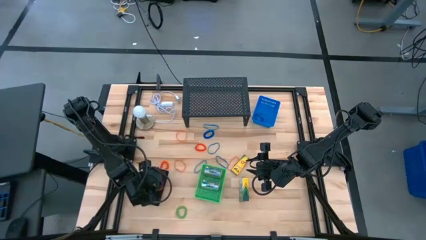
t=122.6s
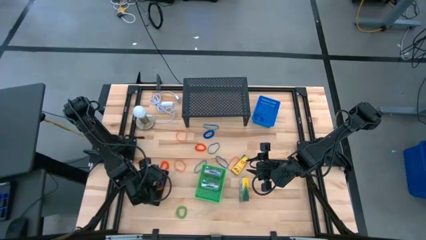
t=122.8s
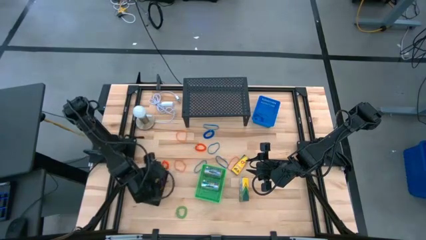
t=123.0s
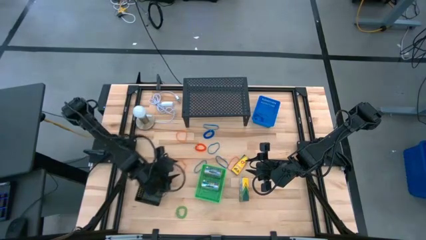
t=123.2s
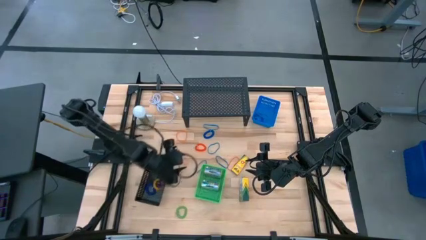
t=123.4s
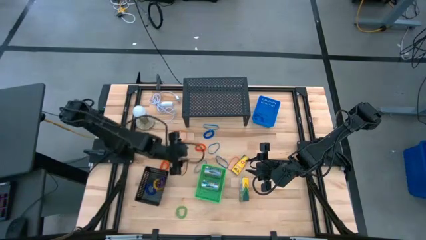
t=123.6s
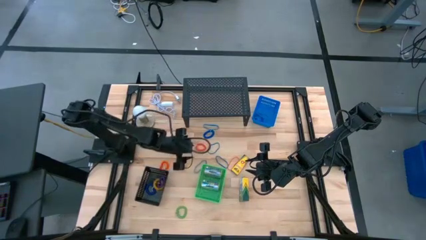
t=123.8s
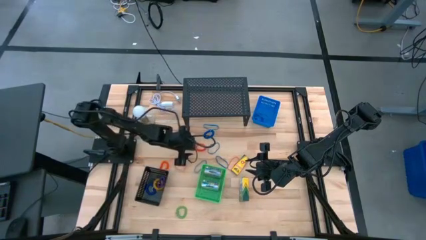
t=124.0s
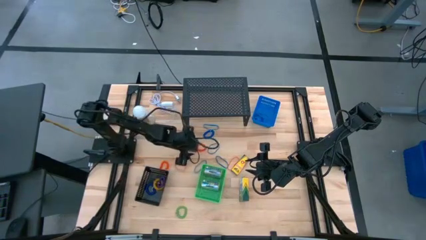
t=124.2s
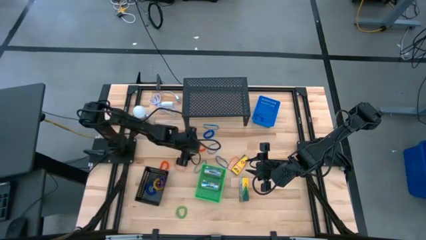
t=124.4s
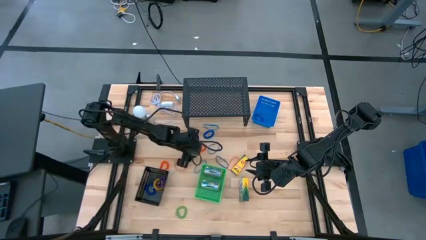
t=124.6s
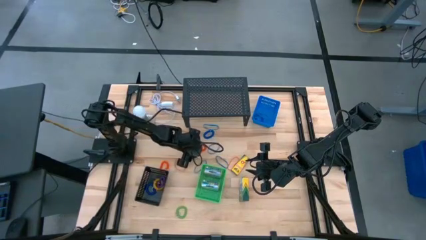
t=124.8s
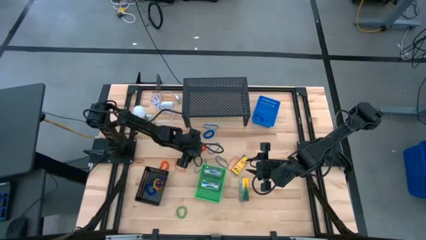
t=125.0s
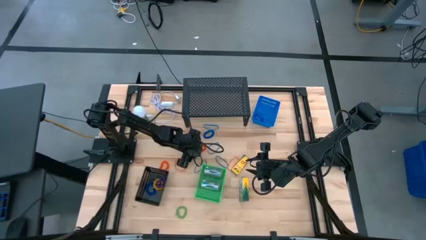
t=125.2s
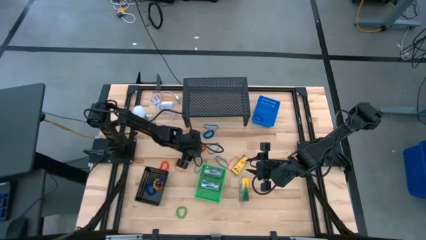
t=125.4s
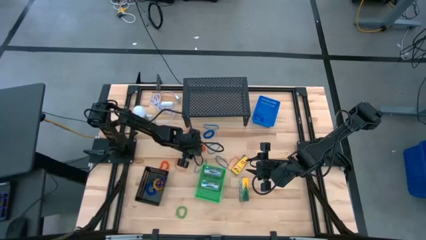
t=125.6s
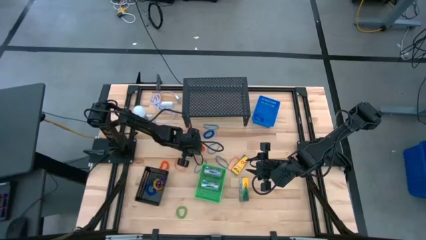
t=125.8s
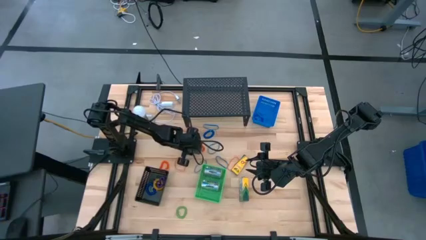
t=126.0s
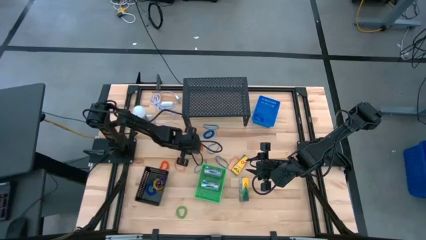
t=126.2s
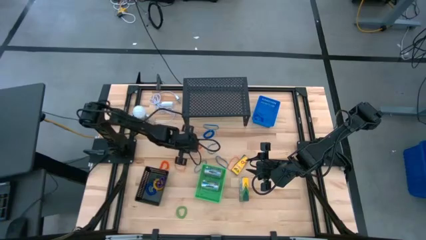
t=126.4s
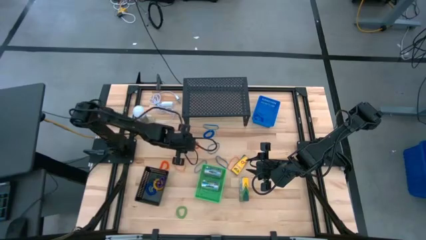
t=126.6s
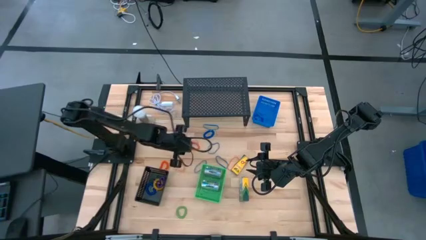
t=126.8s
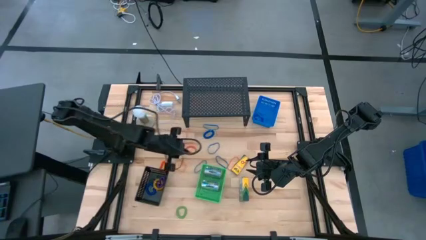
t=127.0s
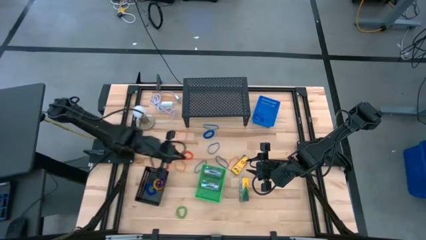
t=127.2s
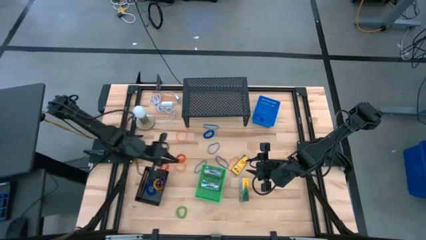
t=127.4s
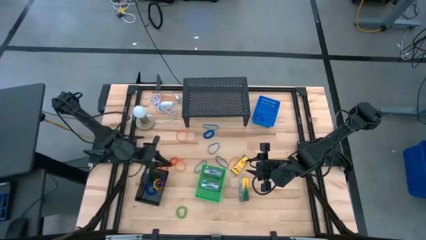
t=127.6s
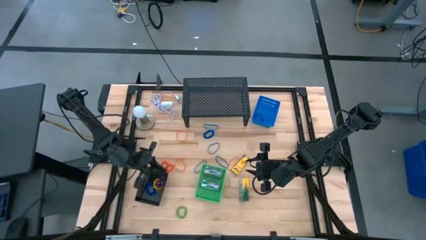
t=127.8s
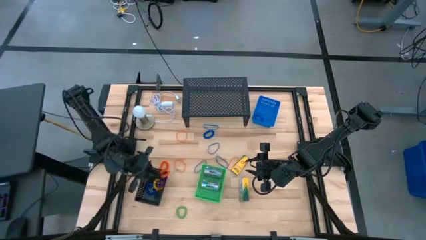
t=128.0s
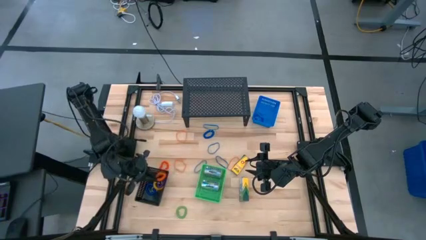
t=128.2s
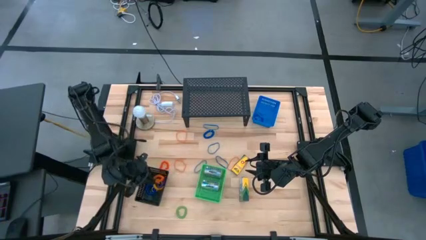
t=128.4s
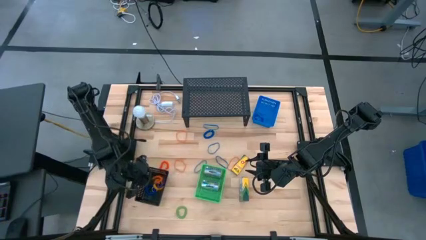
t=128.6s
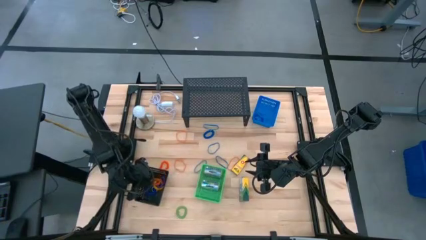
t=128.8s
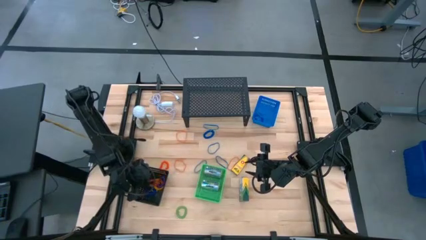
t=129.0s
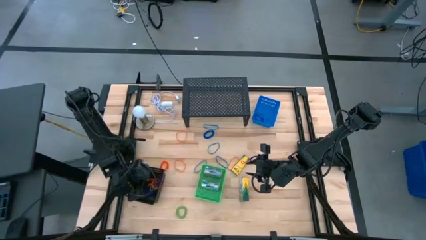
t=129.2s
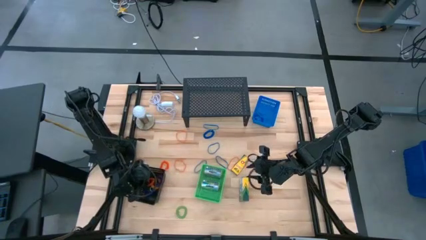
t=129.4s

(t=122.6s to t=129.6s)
Task: Pick & Place Office Desk Supplies
Put the orange spring keychain into the black bin

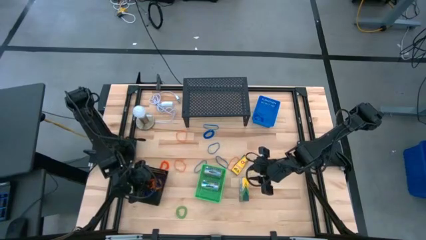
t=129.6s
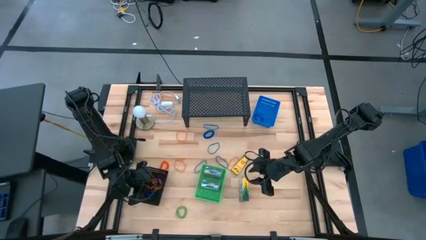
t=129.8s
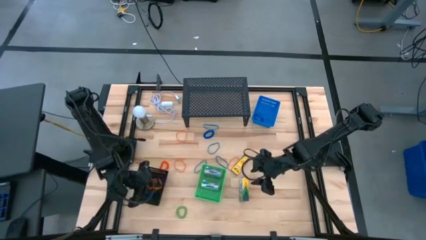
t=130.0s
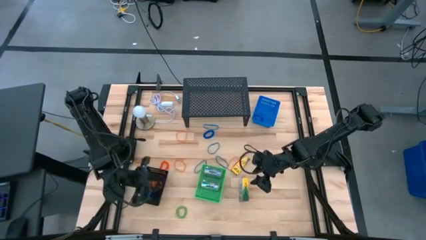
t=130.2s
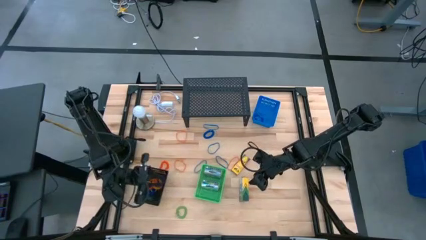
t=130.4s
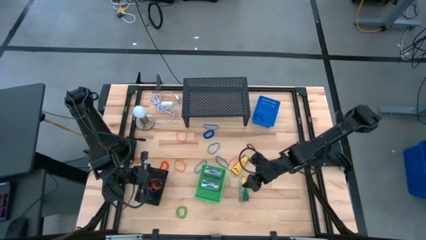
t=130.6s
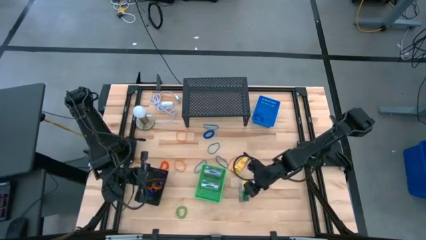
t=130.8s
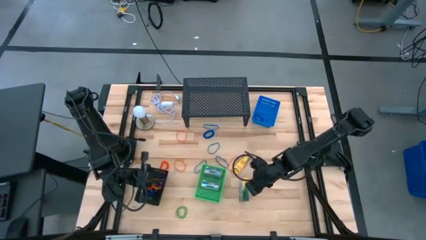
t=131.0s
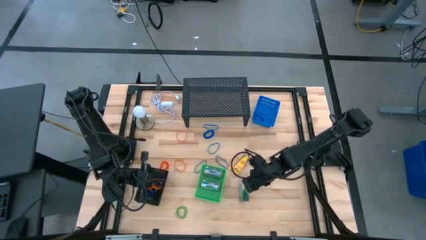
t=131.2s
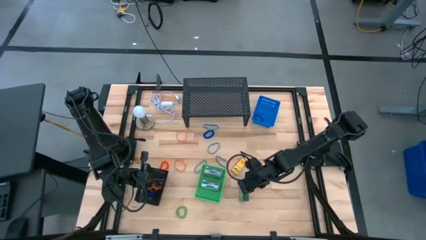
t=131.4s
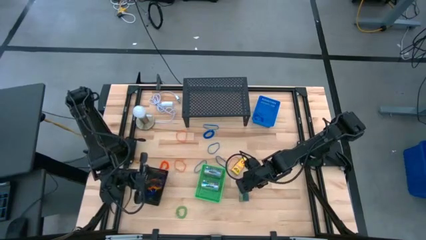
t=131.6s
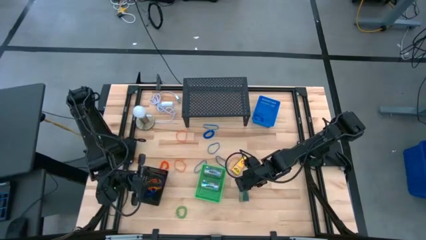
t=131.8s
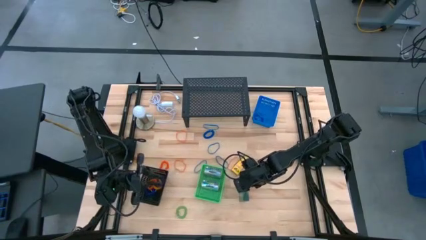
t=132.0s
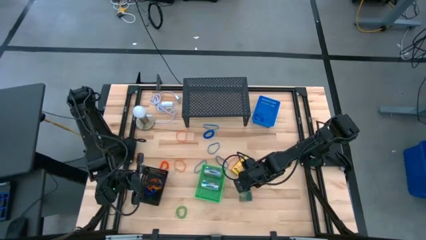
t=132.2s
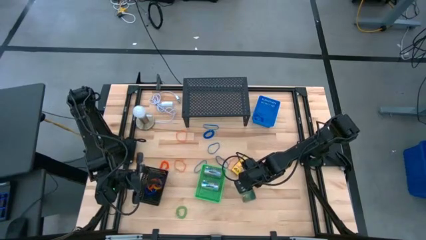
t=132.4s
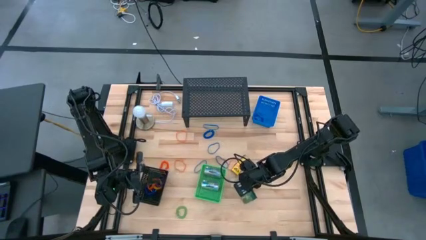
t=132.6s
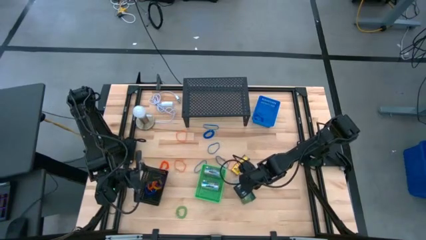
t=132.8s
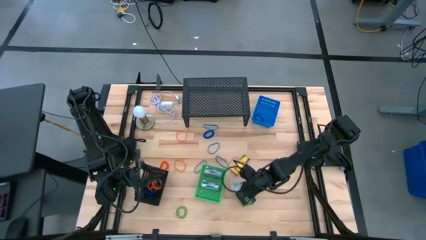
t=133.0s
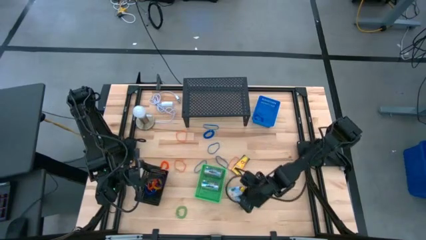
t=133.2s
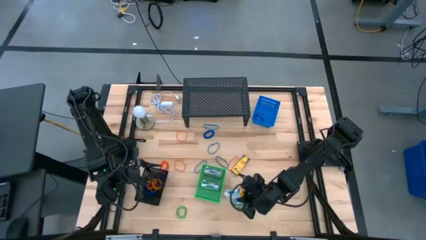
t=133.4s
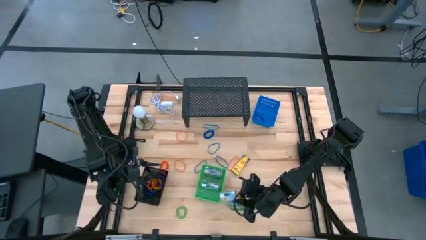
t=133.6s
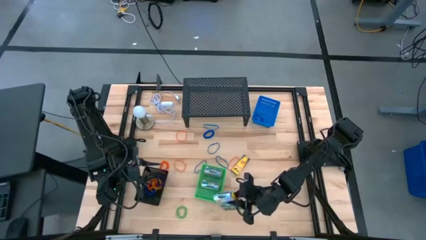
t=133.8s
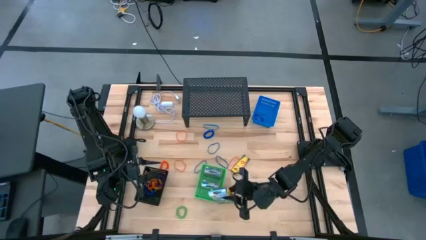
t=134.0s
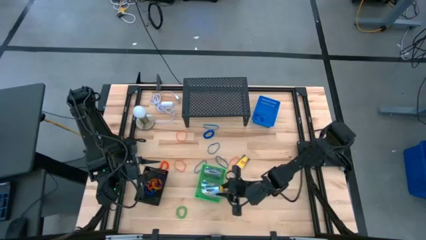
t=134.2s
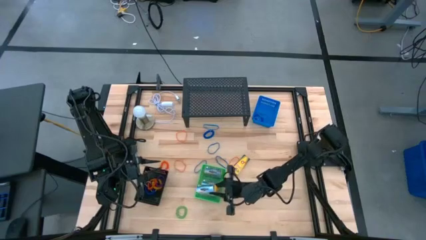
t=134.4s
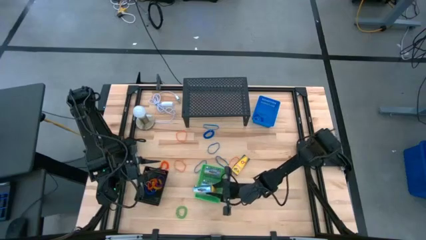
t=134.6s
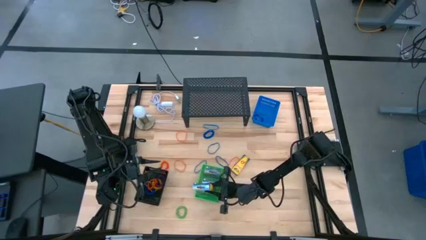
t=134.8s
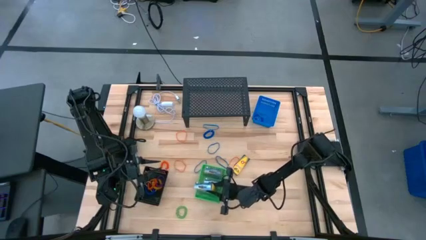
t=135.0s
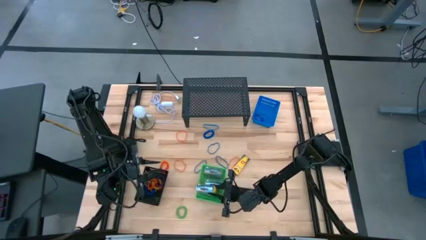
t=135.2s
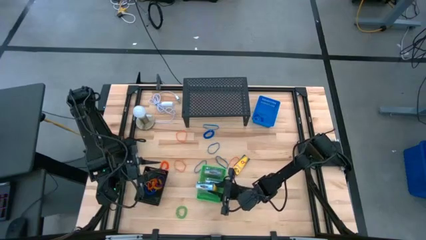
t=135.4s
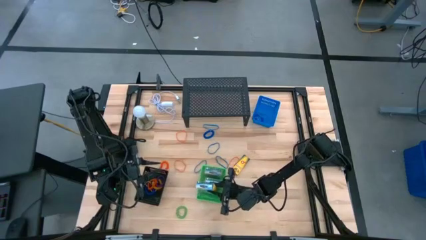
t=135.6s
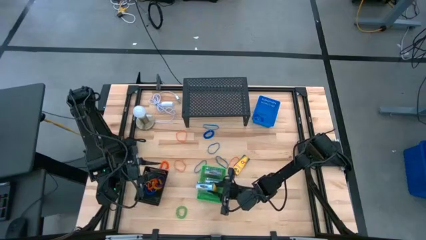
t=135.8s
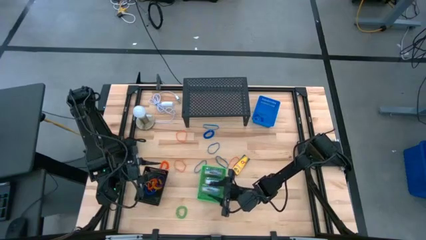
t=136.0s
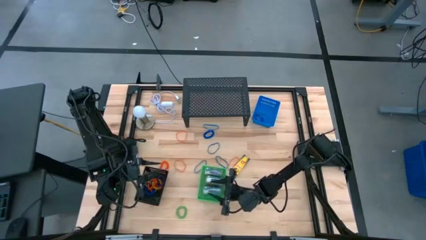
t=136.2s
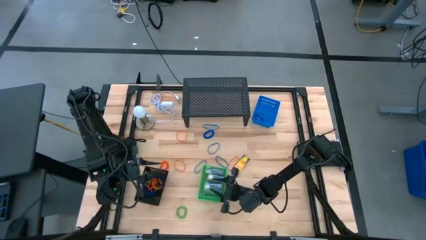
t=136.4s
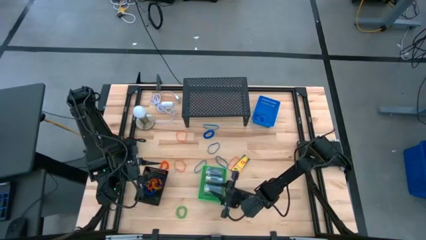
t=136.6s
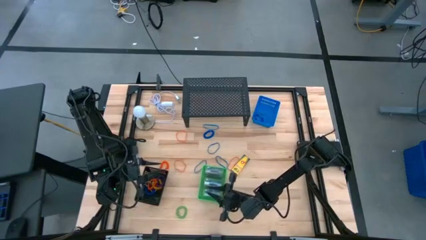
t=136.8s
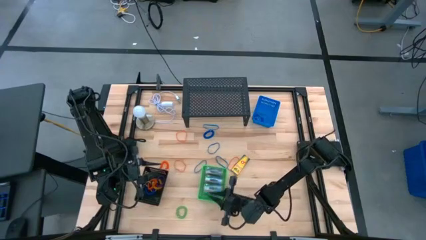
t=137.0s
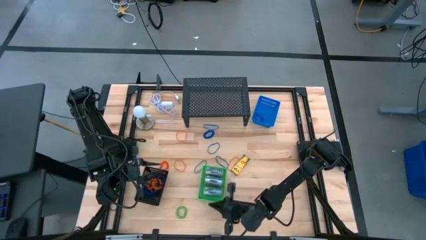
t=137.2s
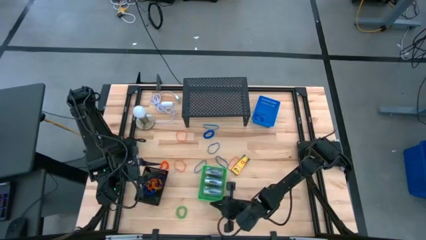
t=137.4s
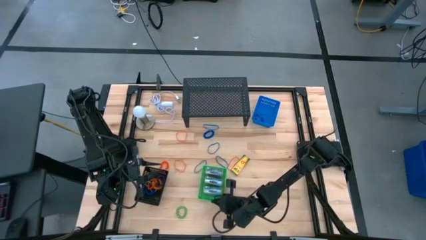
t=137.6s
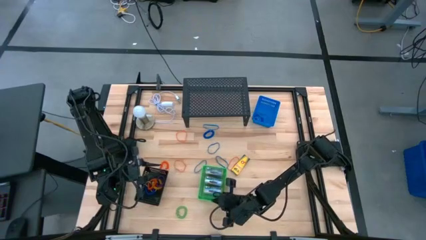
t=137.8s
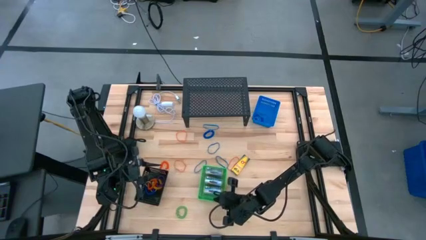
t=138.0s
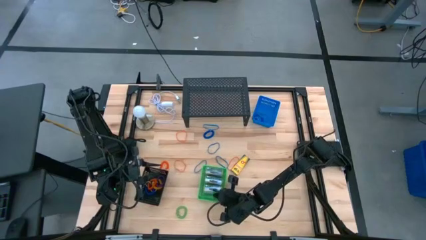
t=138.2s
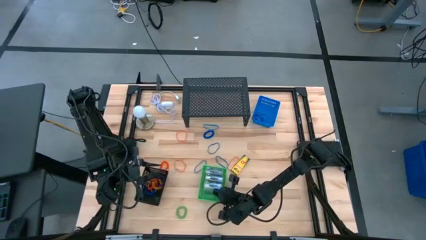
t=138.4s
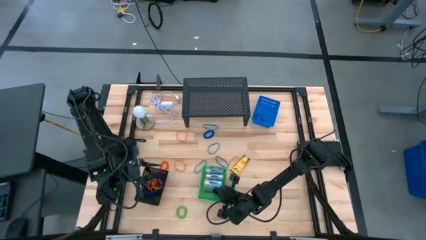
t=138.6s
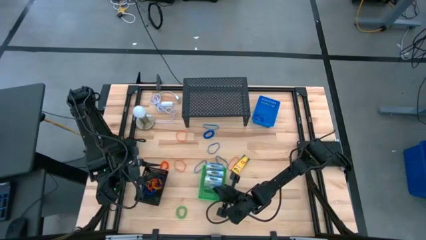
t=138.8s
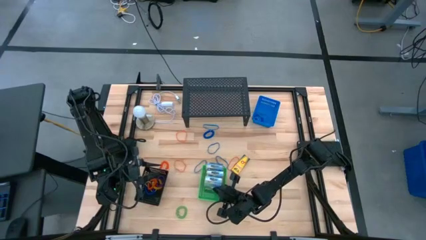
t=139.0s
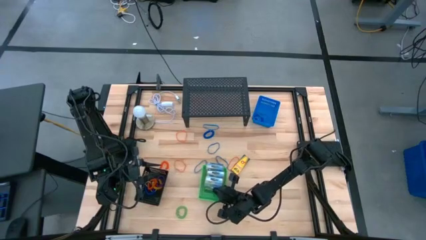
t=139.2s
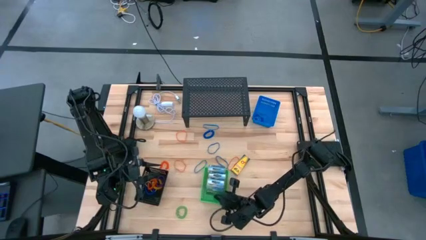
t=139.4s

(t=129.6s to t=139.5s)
Put the crayon box into the green bin
